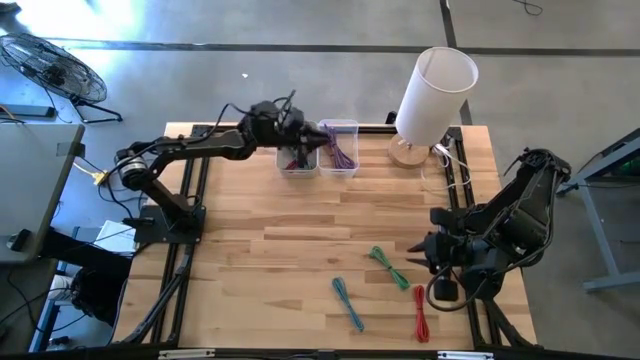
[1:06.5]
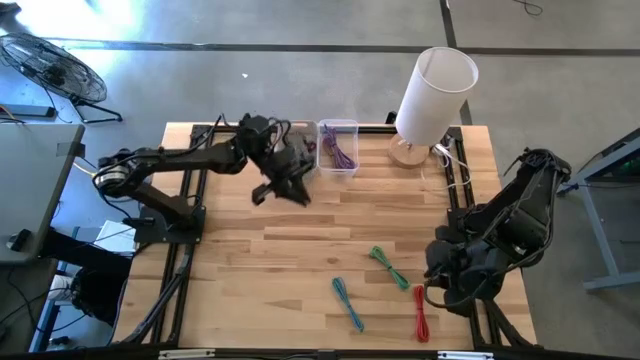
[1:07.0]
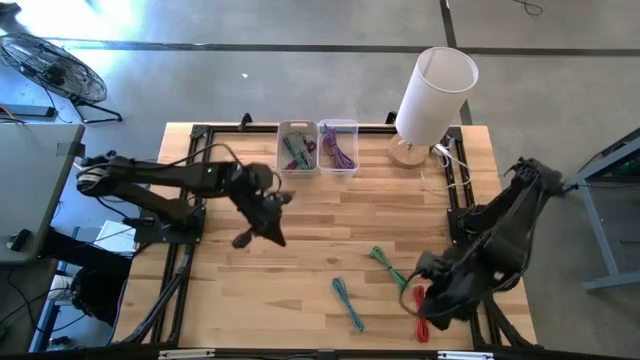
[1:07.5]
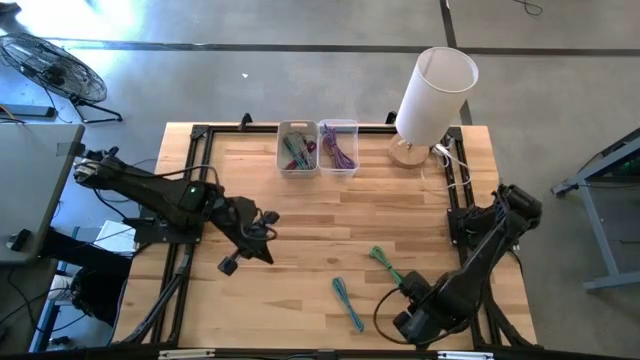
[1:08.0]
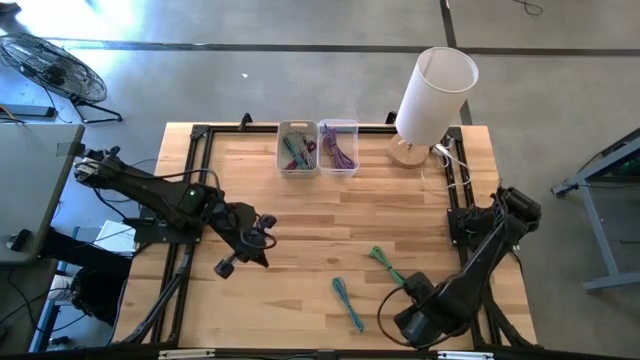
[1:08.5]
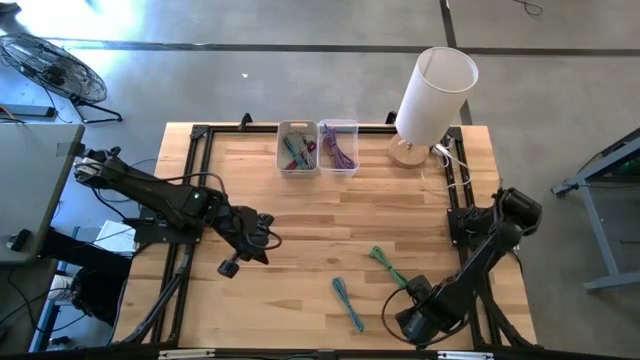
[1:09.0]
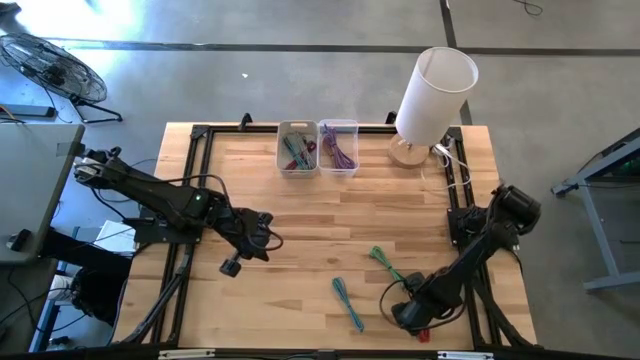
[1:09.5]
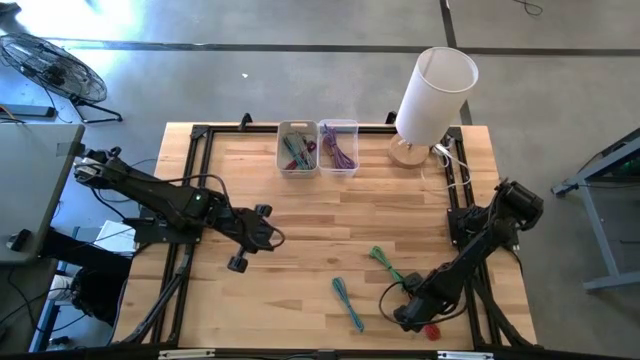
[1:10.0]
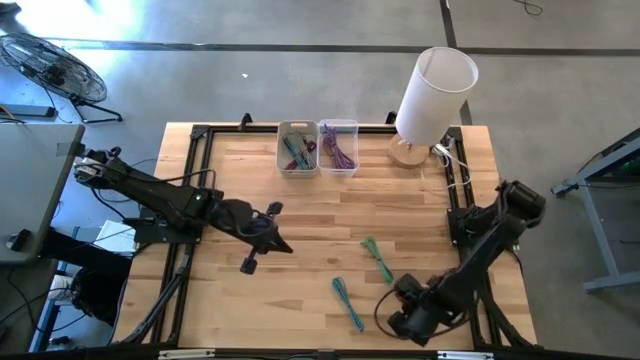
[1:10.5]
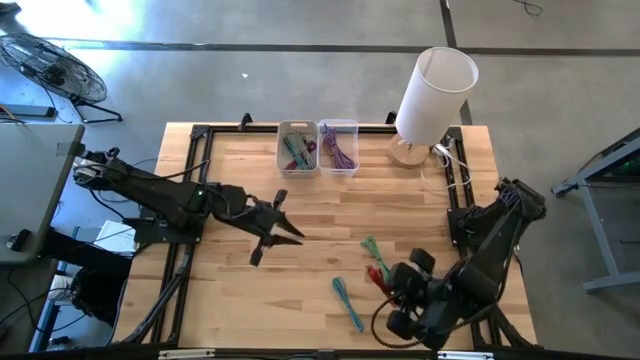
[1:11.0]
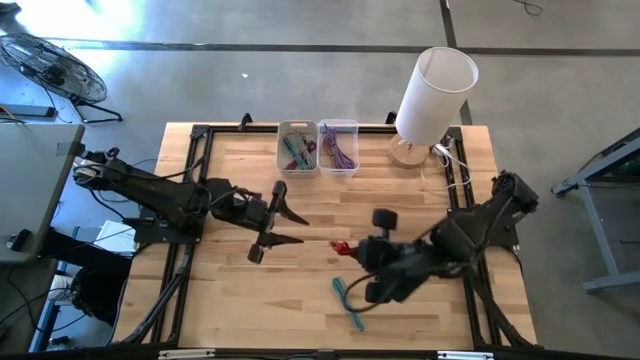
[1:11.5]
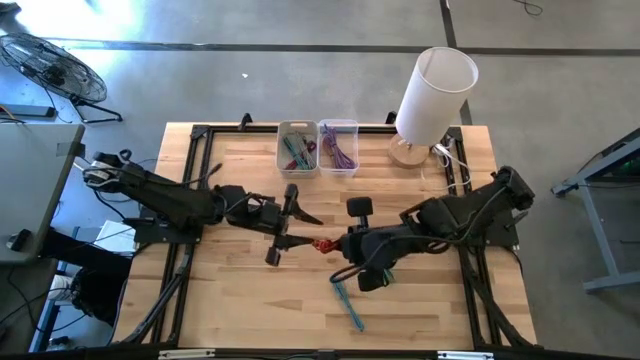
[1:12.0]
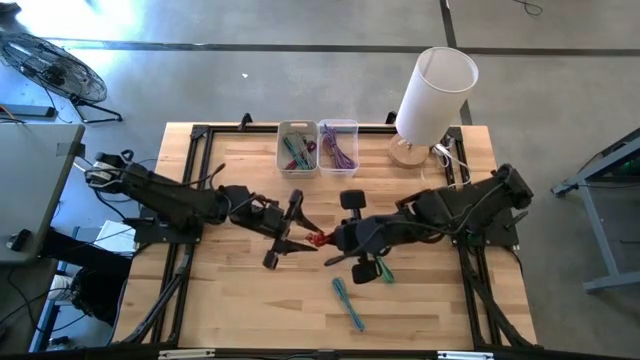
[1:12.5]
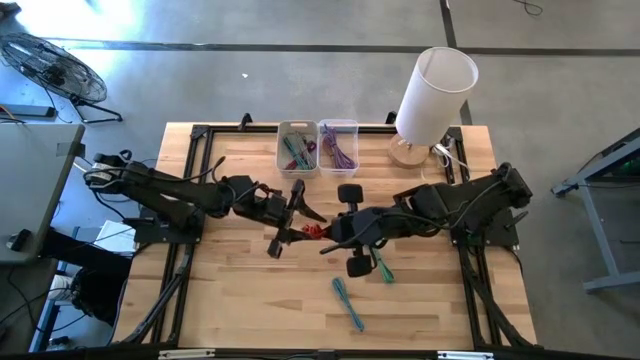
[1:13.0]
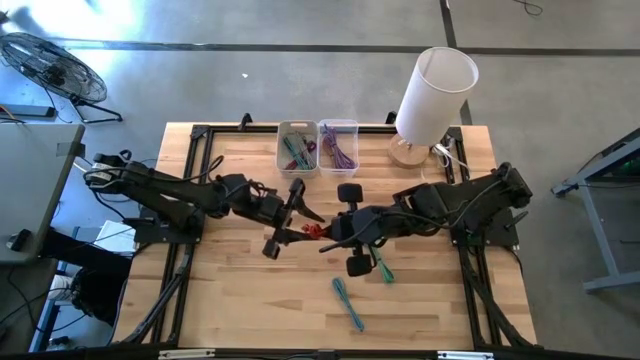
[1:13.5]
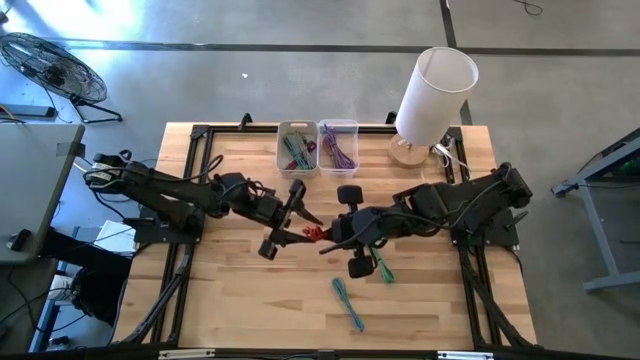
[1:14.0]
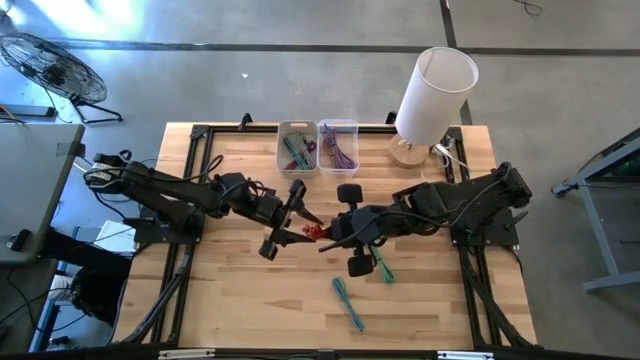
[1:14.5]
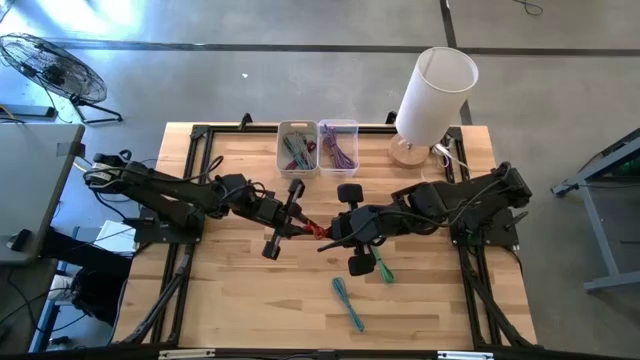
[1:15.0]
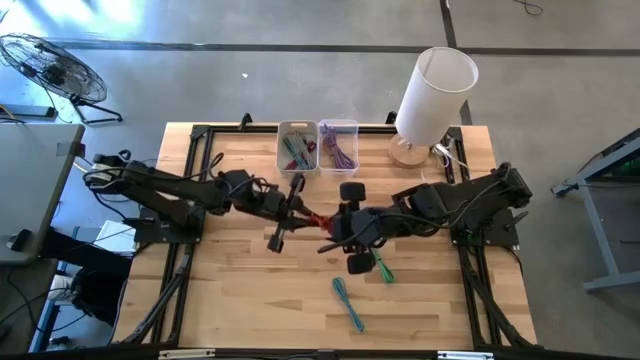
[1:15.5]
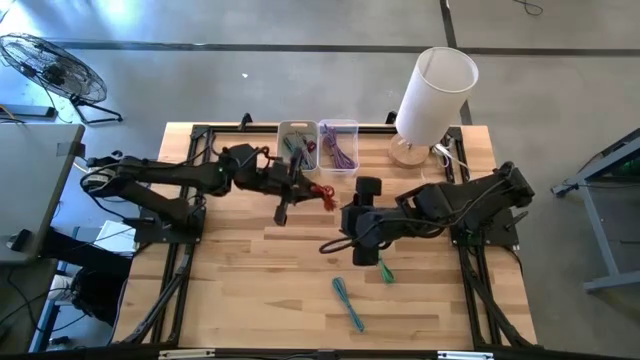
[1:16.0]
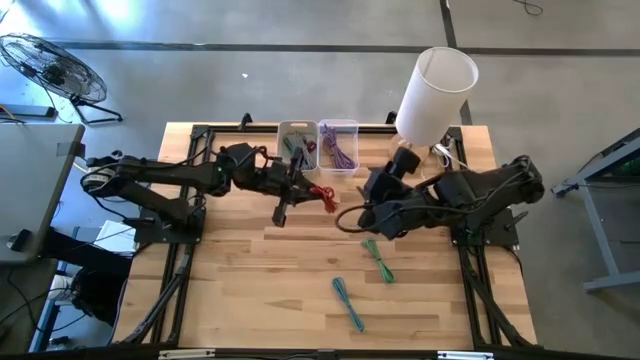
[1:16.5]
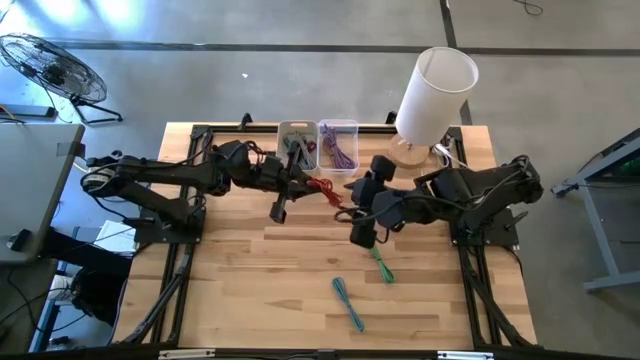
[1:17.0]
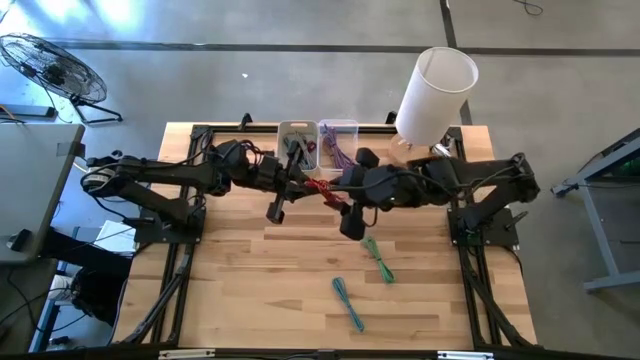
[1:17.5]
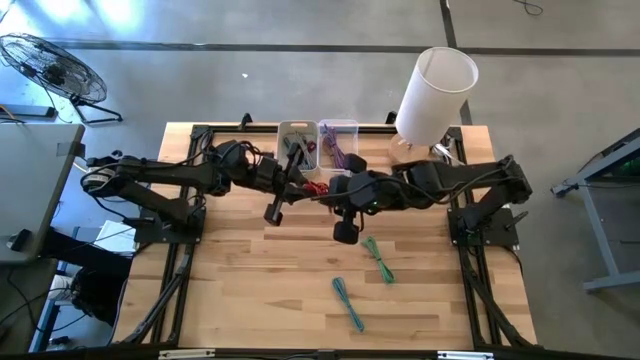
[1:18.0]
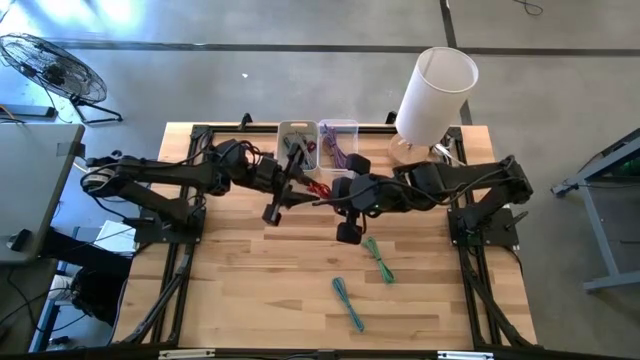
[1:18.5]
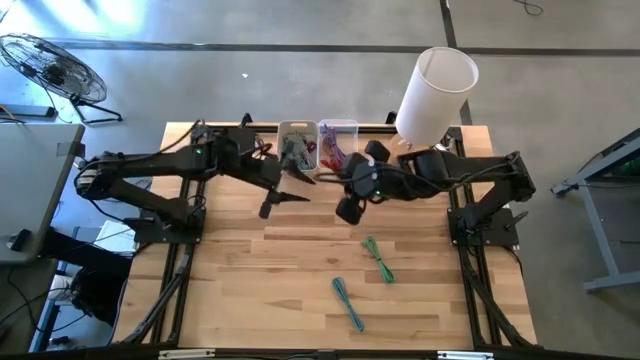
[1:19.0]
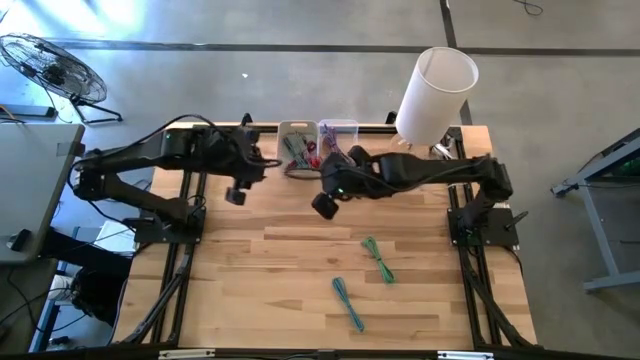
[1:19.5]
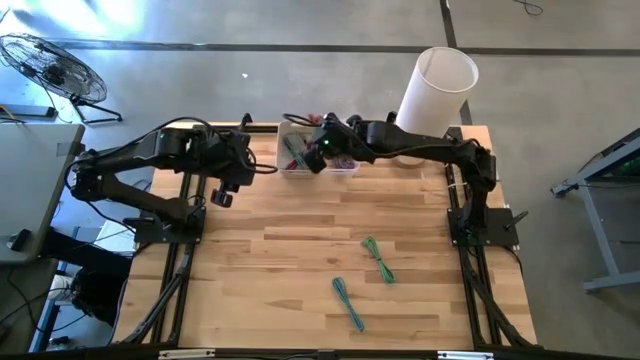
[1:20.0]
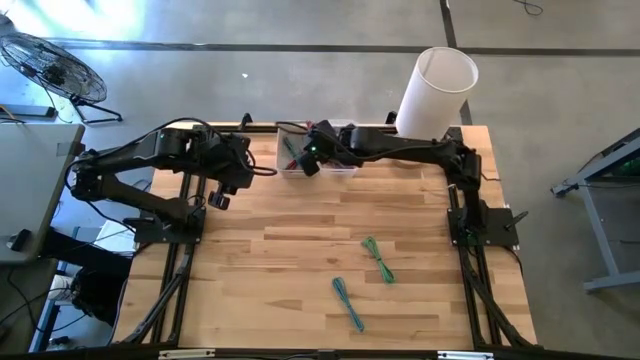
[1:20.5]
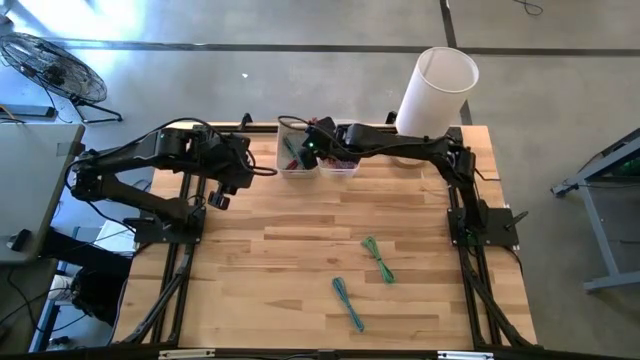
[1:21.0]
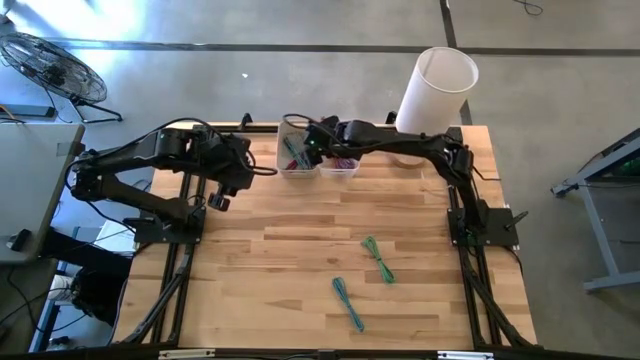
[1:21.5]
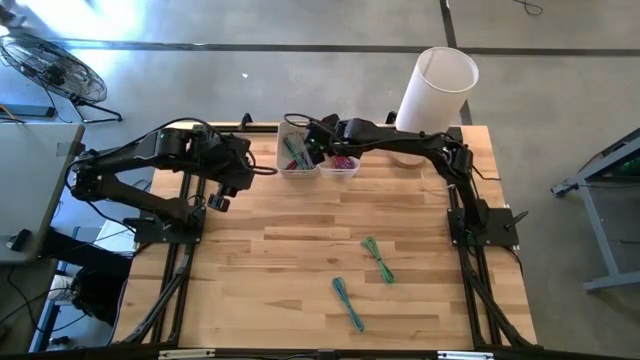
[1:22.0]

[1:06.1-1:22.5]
Task: Pick & Place USB Port
Put the red USB cable into the transparent bin

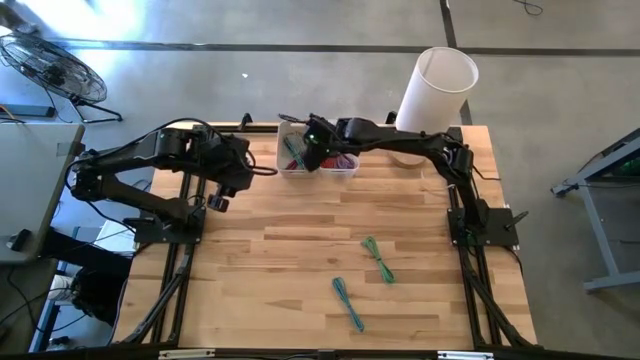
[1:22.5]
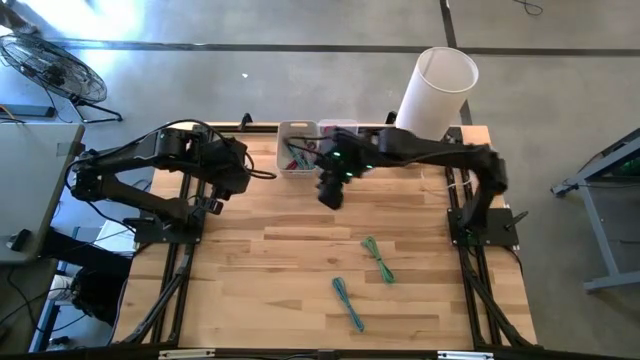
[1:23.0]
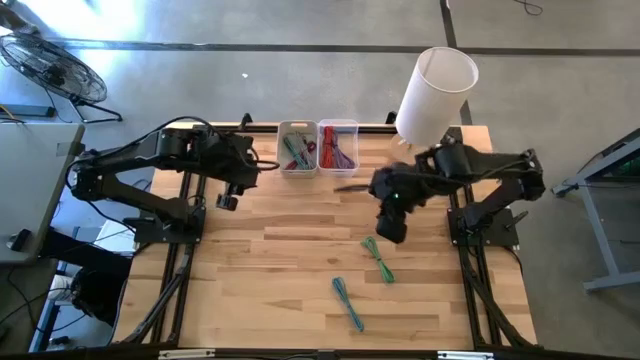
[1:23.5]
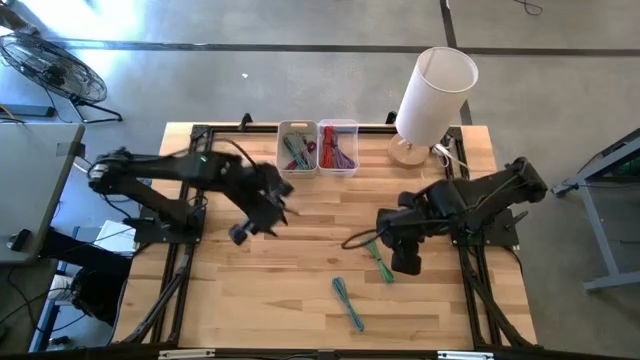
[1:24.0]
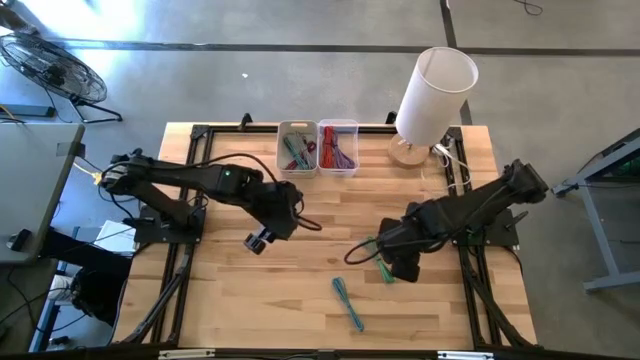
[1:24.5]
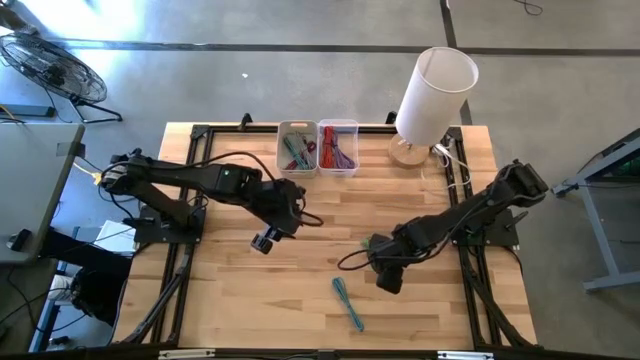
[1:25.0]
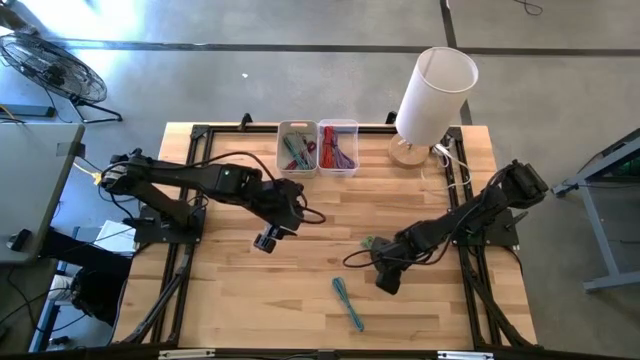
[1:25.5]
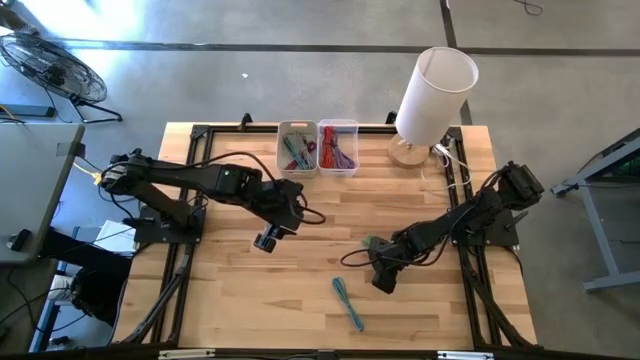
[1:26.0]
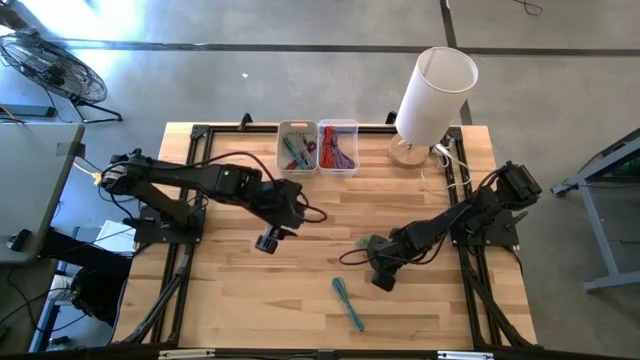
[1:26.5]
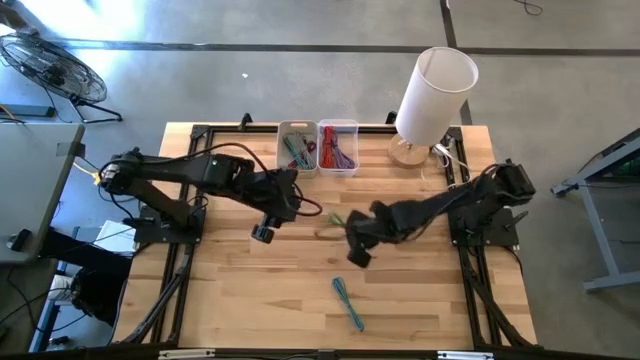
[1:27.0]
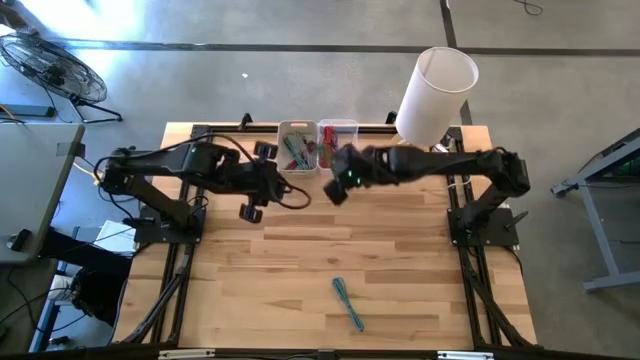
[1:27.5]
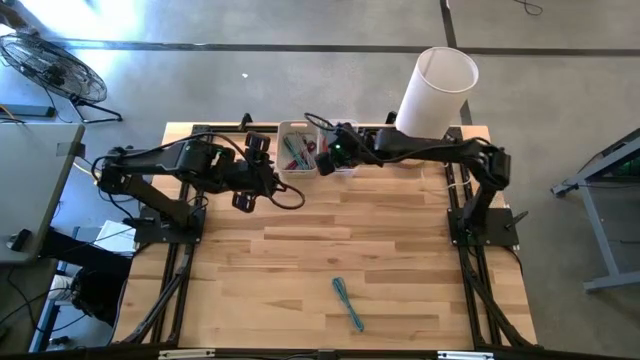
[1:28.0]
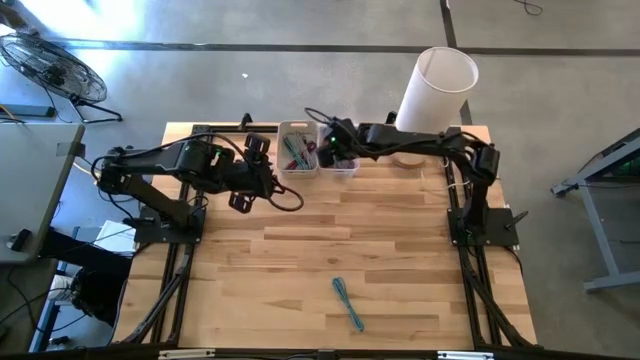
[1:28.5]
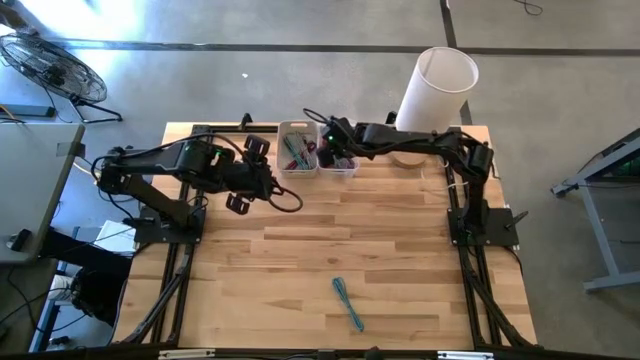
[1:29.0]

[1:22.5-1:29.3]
Put the green USB cable into the transparent bin
